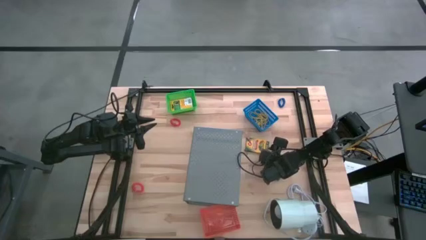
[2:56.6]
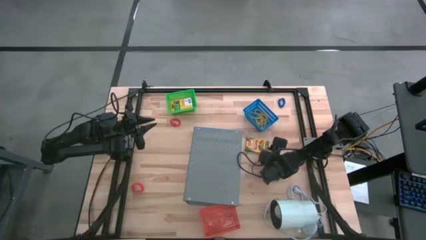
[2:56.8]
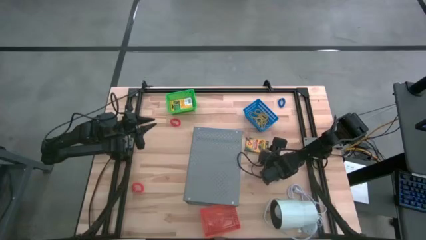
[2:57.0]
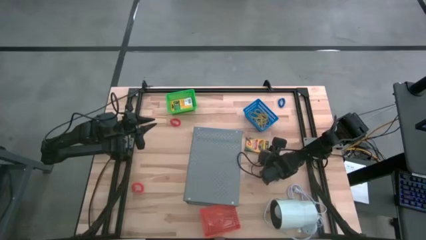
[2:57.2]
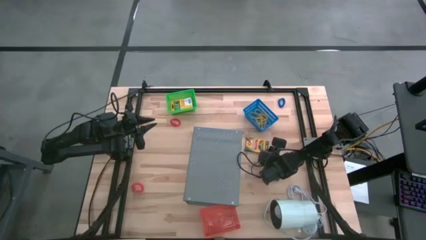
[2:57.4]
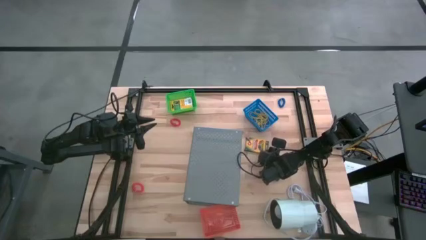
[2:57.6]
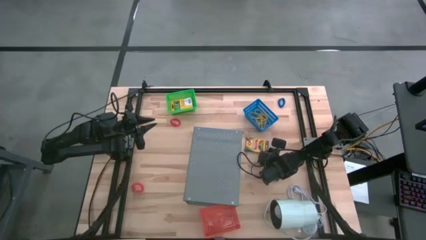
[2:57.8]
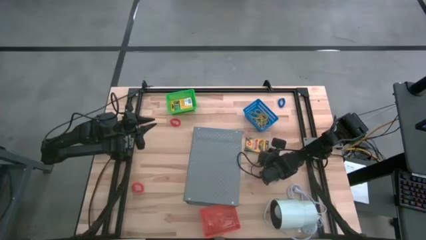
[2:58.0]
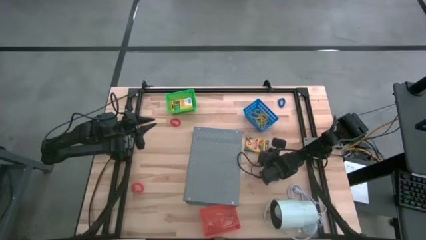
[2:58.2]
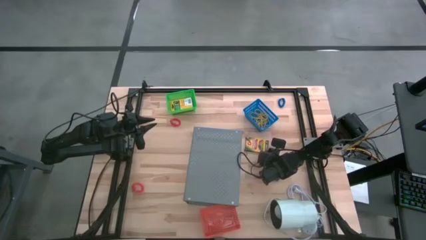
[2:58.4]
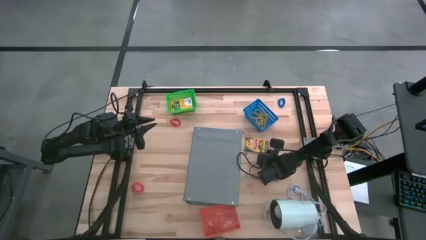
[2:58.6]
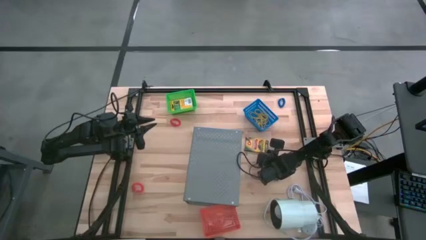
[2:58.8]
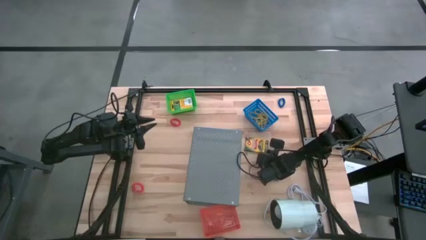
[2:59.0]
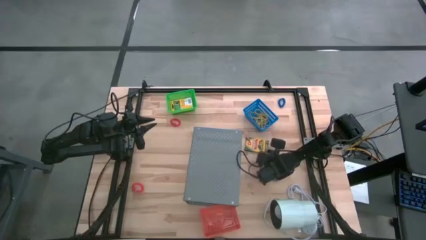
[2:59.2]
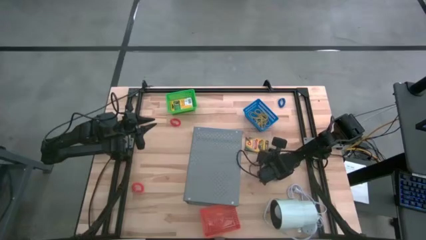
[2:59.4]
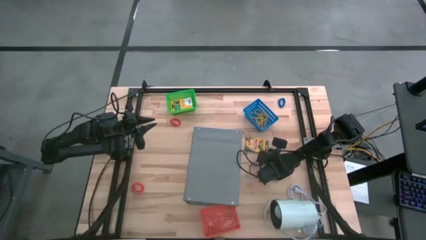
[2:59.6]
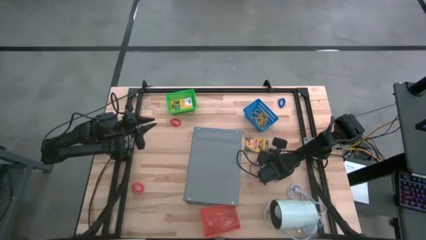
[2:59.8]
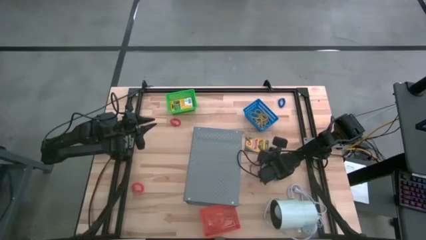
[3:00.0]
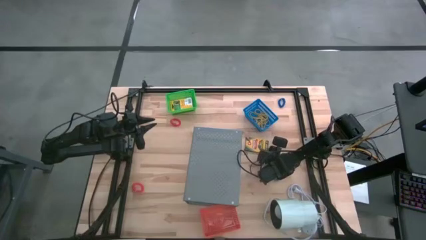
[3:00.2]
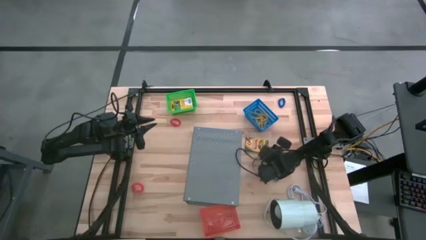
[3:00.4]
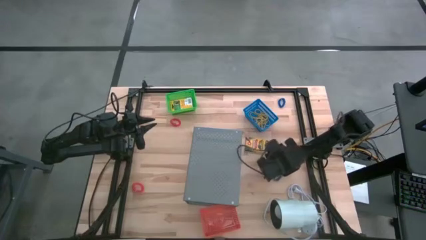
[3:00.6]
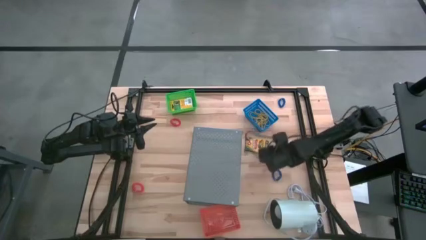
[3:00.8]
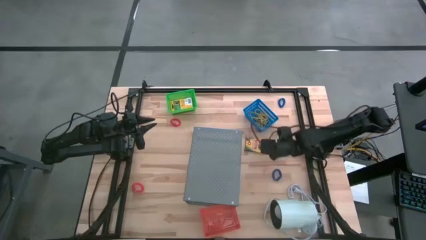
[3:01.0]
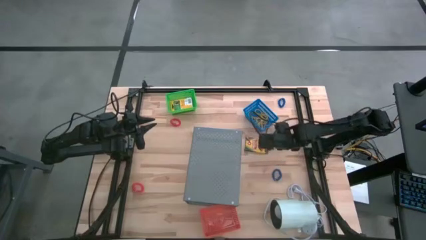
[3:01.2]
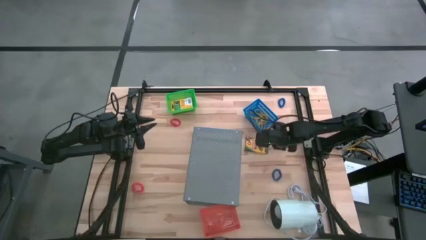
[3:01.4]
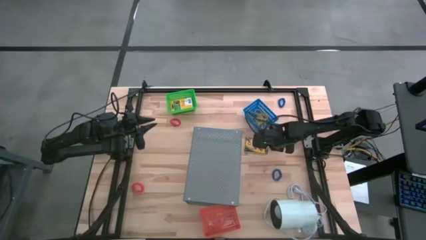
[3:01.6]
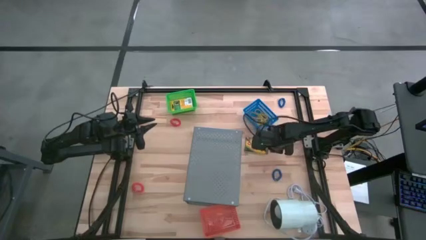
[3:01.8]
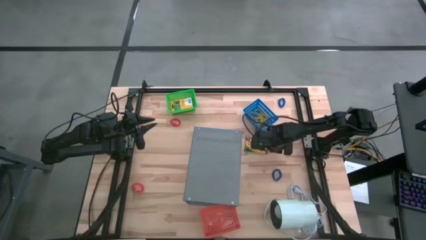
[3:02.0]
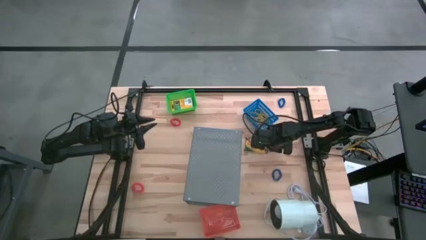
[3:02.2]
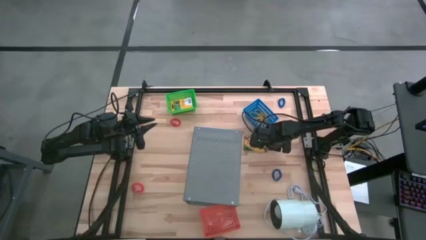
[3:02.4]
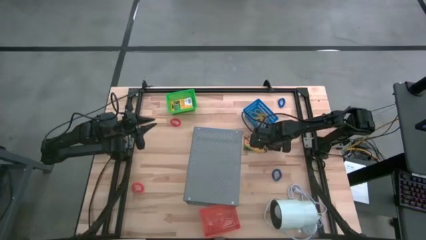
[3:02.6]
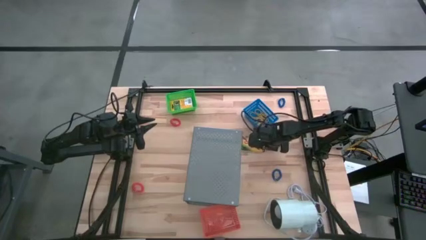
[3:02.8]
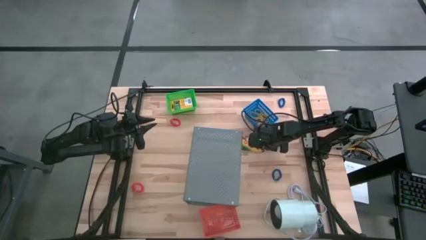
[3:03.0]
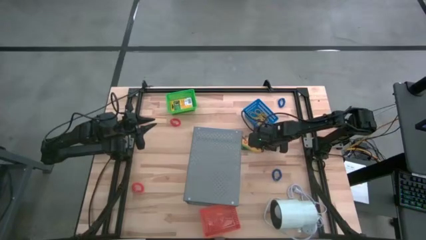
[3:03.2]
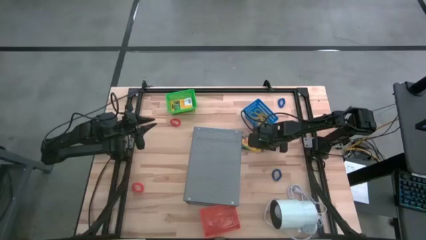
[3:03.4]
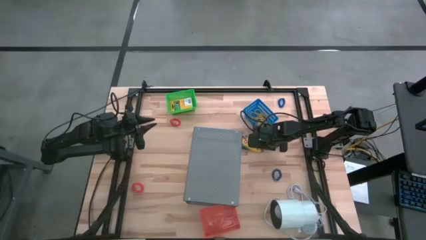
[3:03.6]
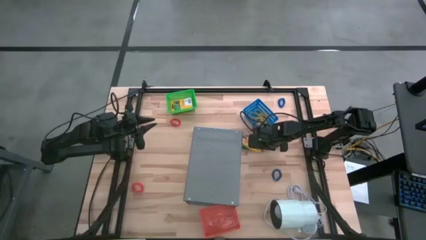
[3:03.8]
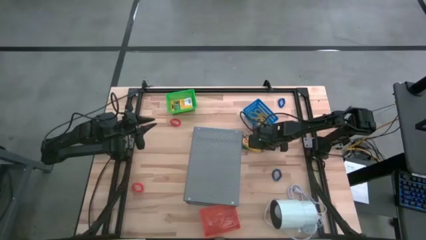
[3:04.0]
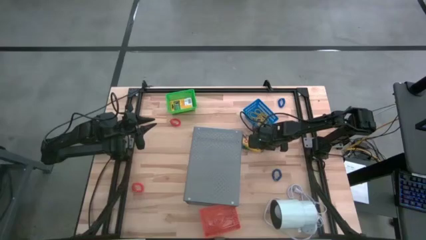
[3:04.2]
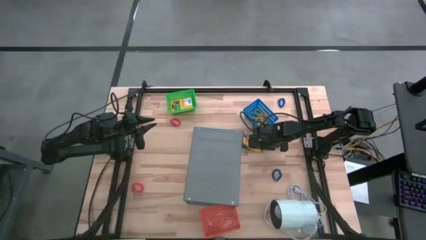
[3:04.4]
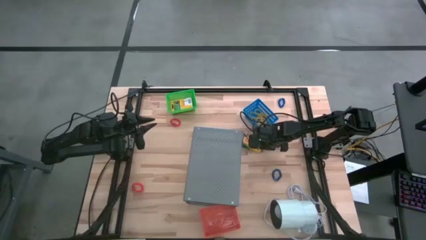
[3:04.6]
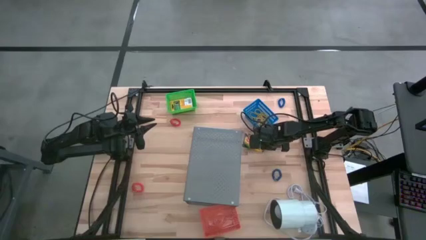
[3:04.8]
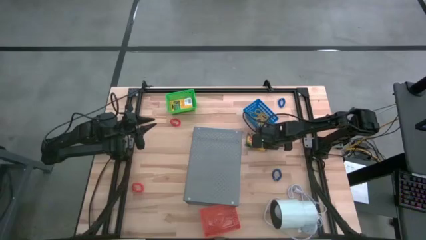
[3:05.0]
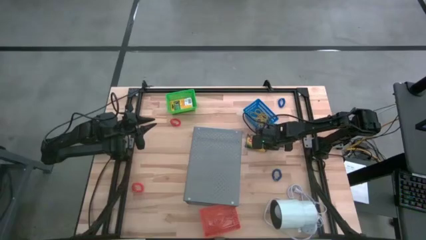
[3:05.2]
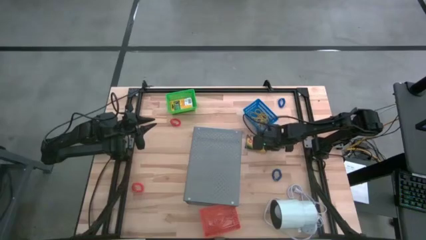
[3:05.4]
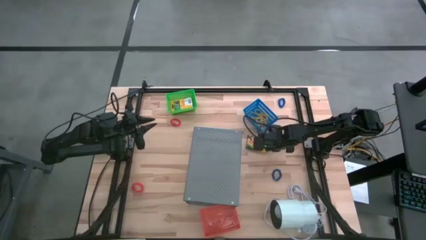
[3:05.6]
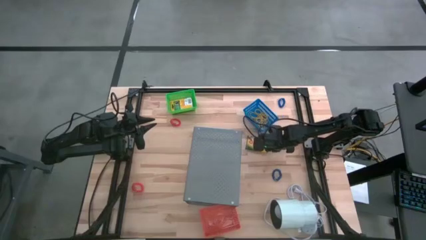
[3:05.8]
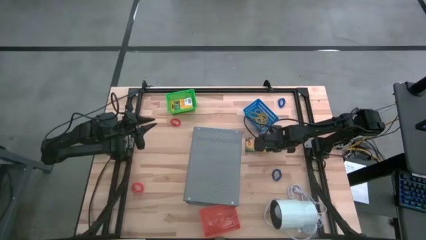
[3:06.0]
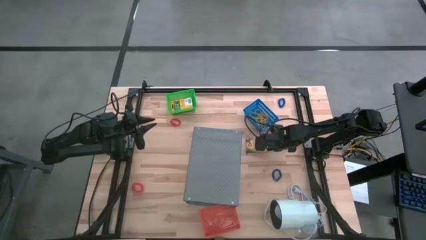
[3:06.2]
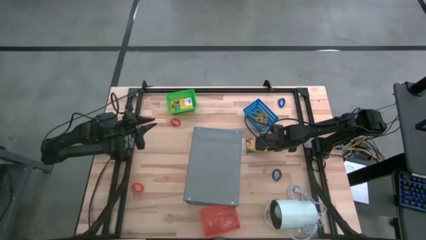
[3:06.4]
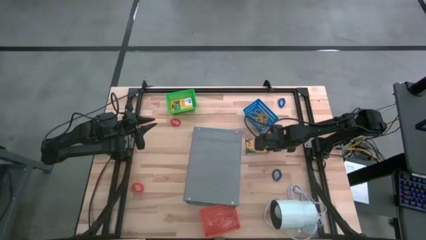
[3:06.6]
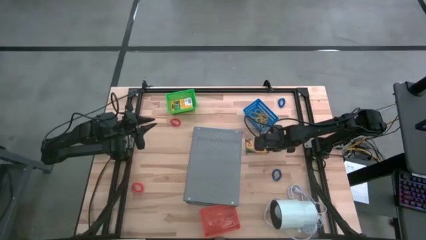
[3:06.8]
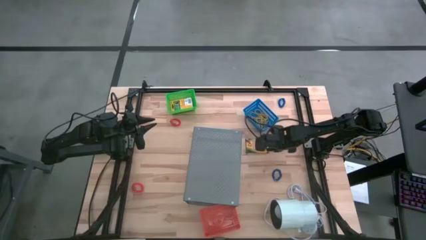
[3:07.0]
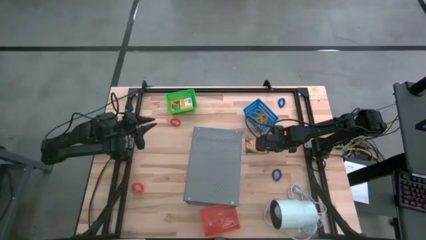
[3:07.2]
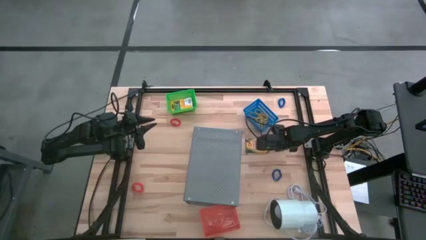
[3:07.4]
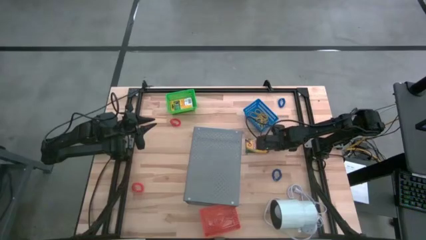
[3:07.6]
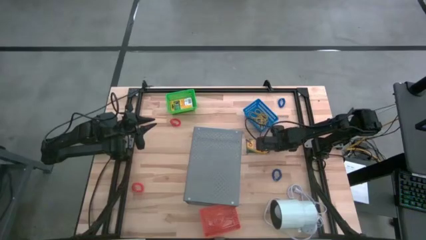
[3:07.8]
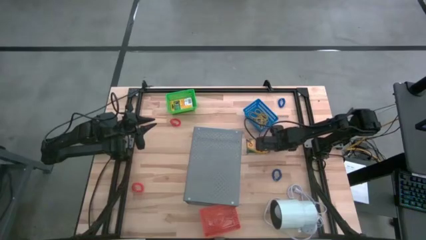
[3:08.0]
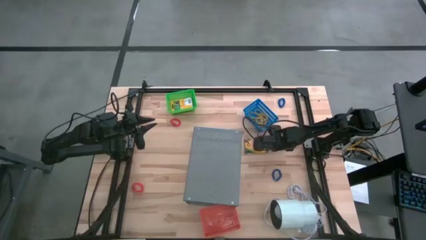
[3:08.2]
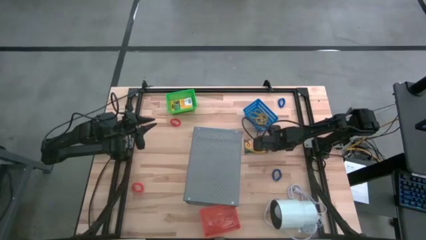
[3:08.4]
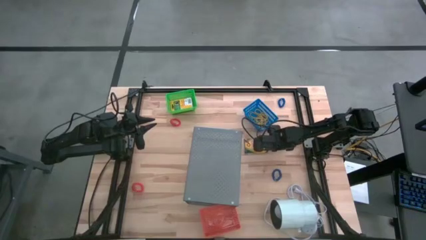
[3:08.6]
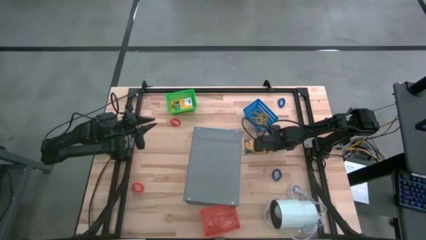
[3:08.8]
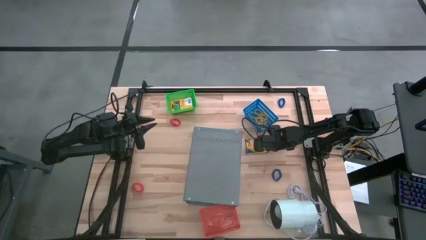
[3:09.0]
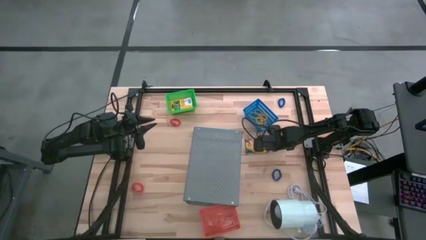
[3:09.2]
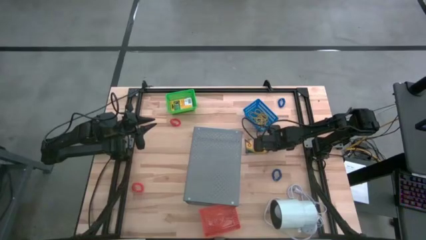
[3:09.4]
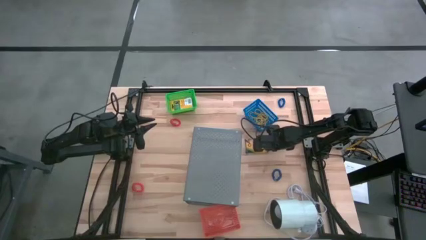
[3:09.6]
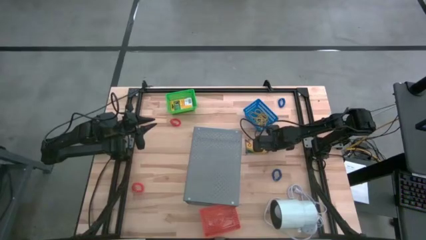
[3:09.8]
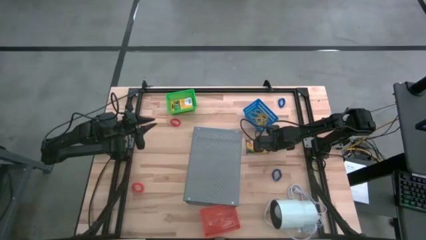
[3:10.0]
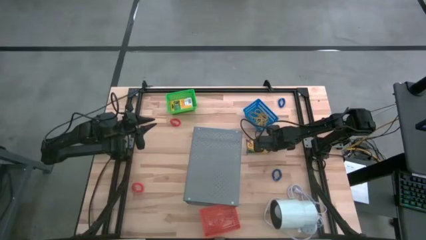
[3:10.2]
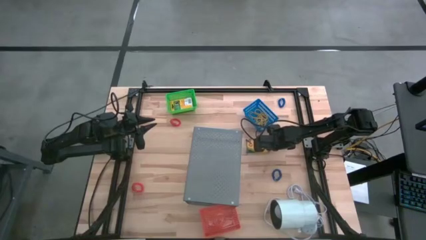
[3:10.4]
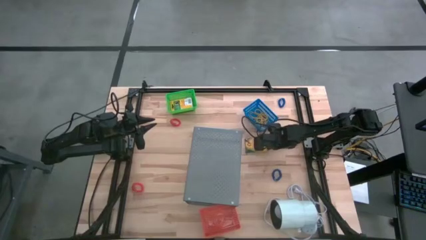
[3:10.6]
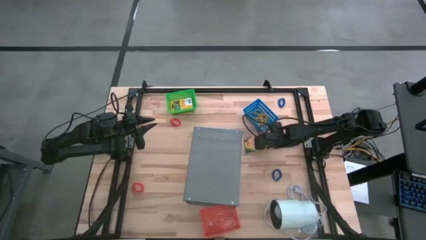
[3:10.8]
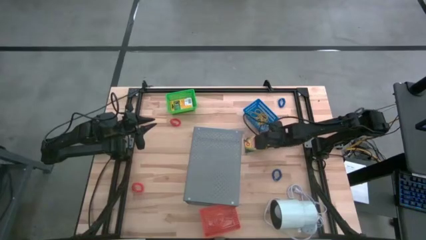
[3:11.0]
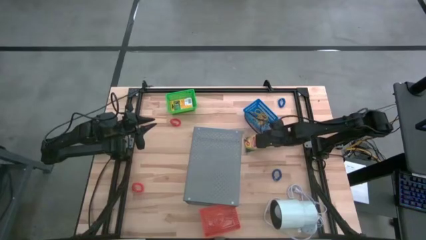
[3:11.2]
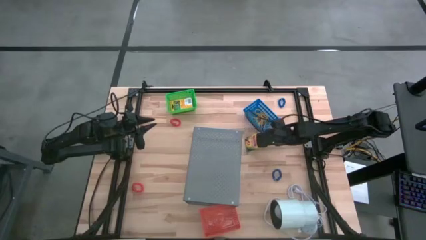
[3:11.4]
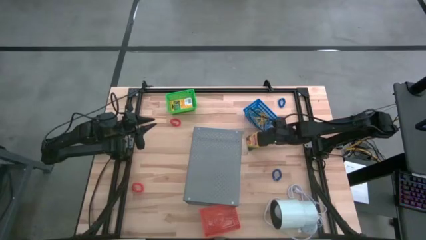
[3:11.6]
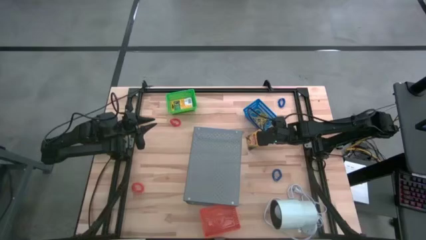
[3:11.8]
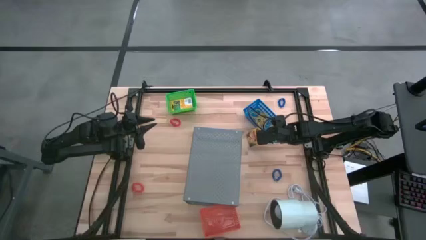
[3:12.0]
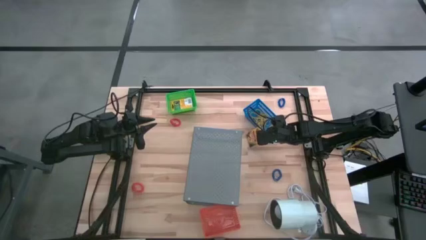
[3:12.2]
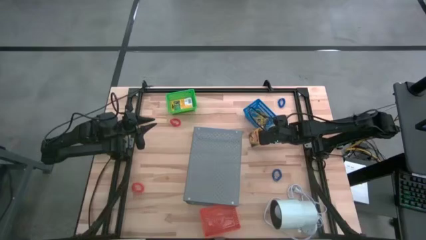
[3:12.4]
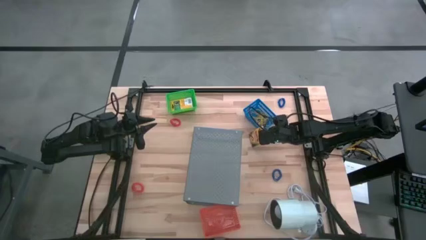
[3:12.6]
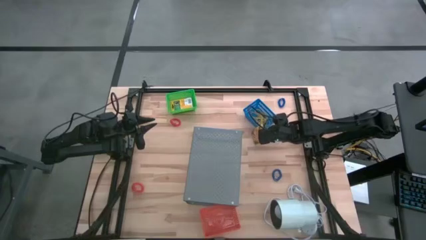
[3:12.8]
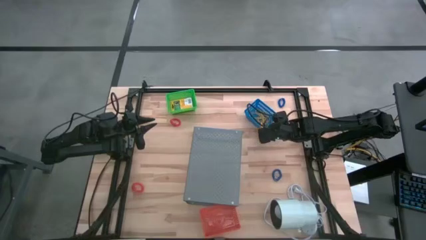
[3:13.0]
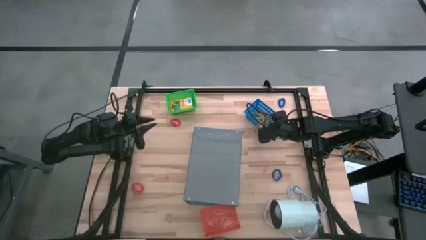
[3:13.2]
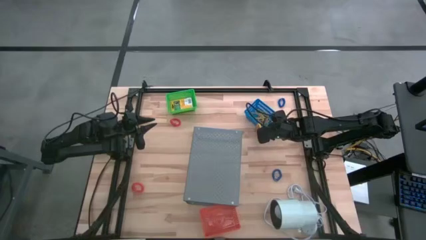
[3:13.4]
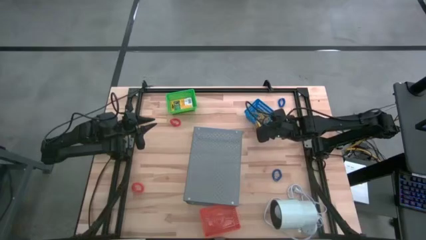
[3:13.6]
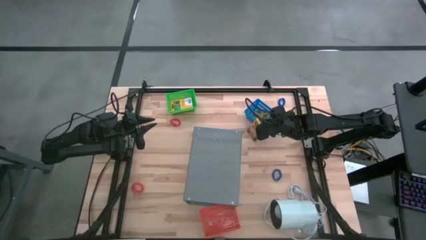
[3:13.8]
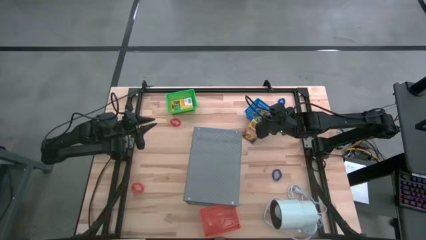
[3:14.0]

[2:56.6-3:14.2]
Task: Pick & Place Office Desk Supplies
Put the yellow crayon box into the green basket
